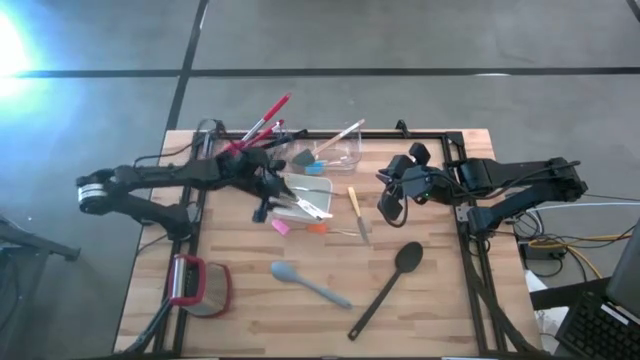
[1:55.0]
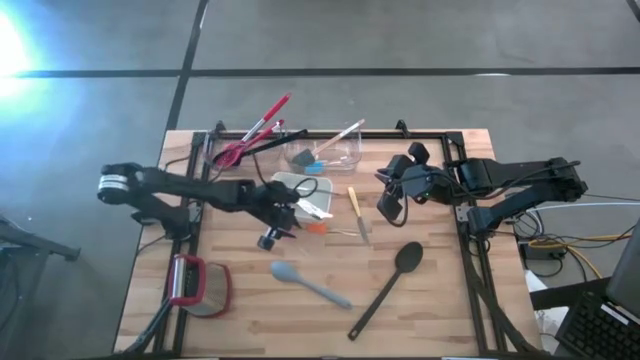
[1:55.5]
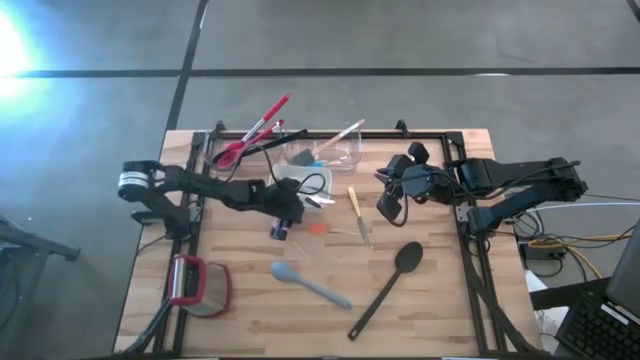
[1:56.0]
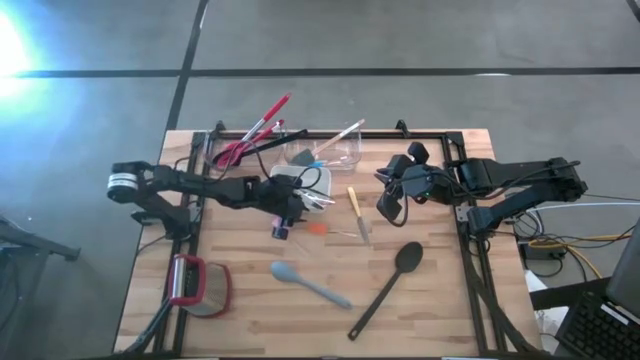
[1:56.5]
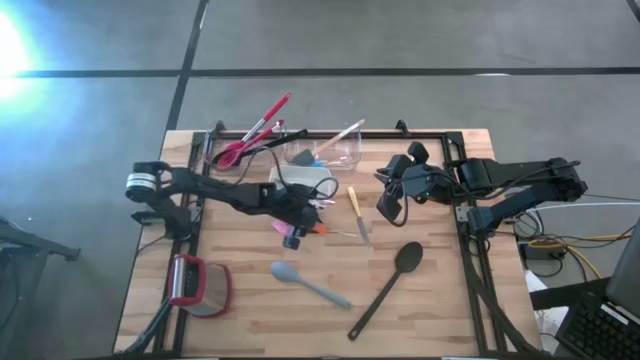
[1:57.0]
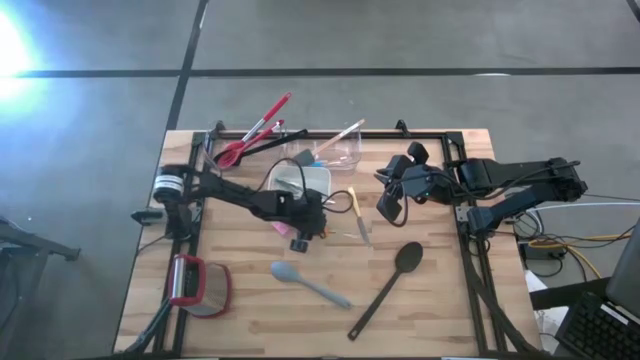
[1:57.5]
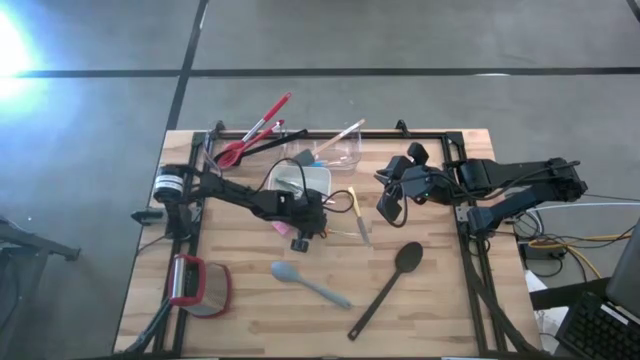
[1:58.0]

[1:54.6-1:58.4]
Task: Pick & Place Kitchen Items
Put the orange spatula into the right transparent bin

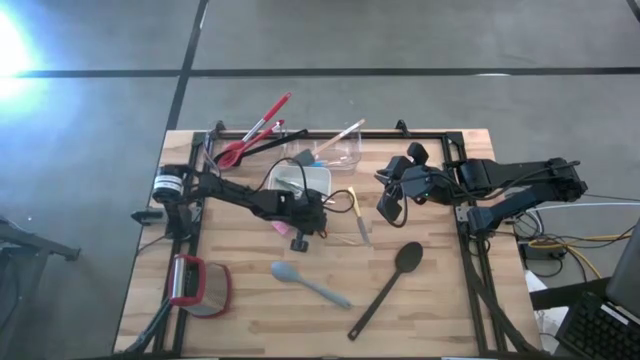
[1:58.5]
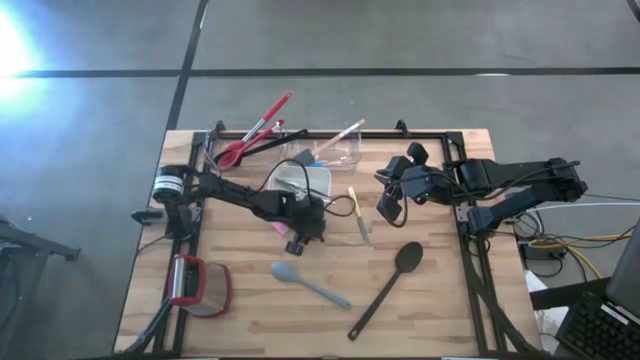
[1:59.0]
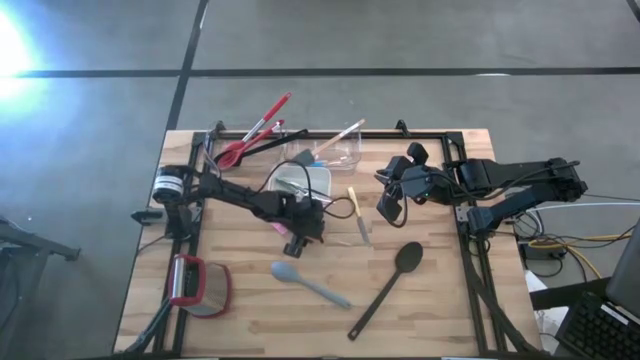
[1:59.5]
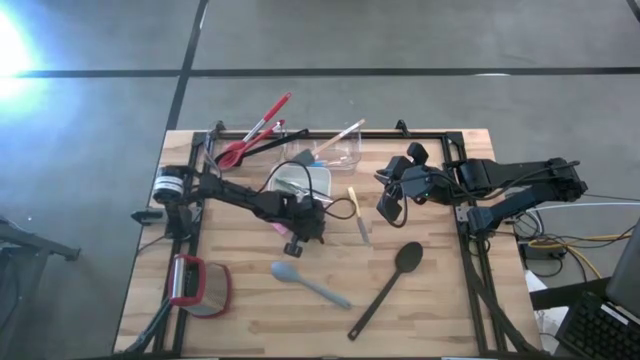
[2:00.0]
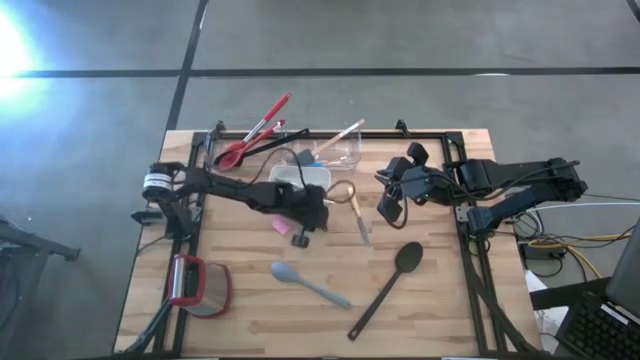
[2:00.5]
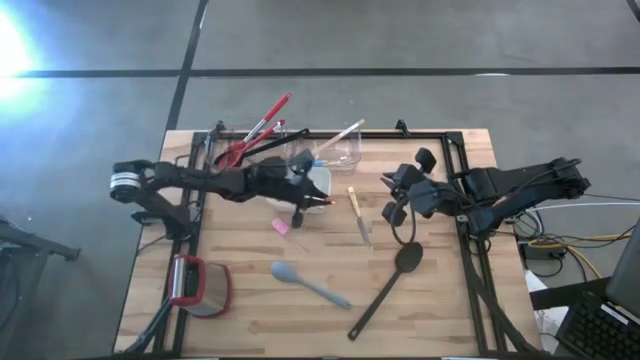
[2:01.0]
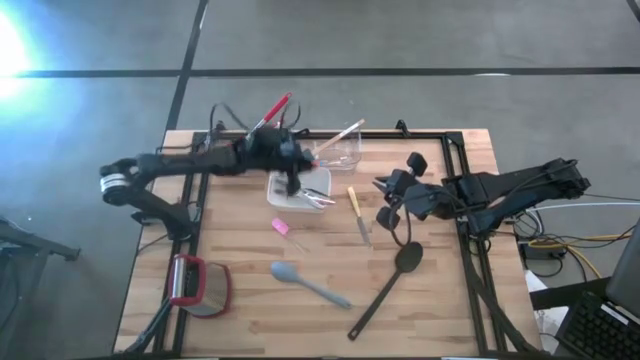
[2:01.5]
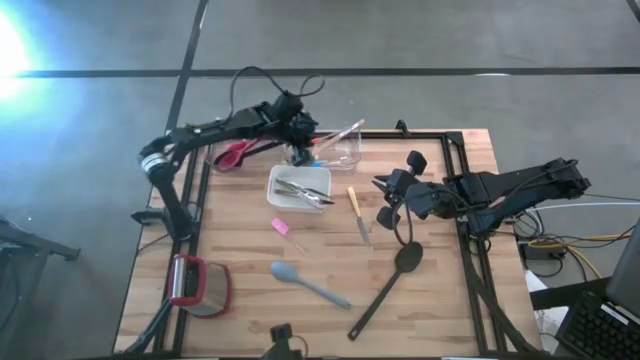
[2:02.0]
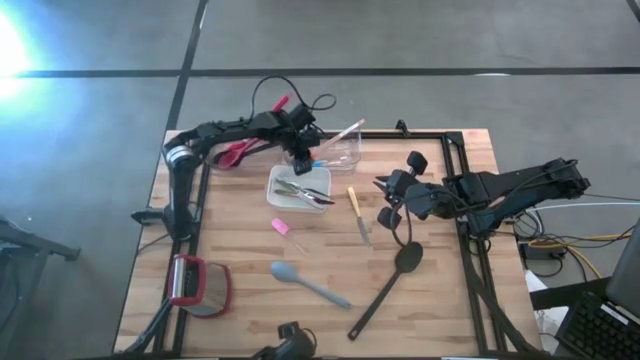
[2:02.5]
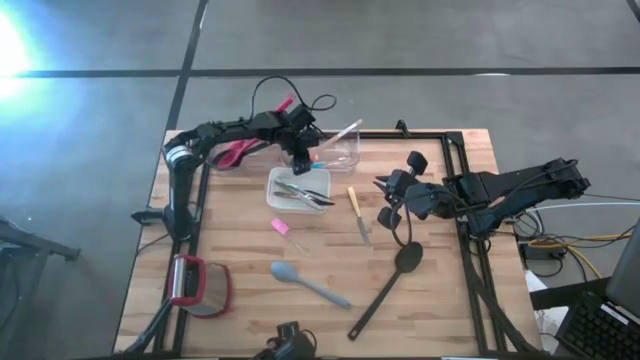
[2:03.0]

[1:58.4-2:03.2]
Put the orange spatula into the right transparent bin

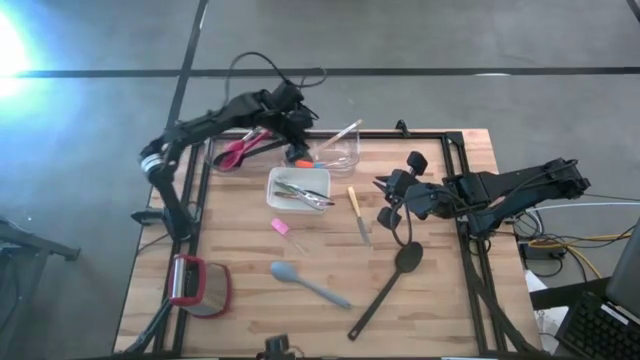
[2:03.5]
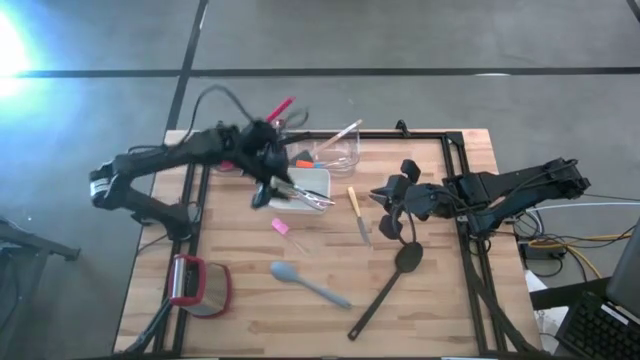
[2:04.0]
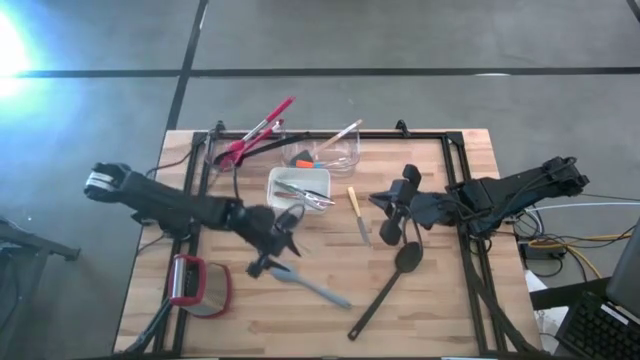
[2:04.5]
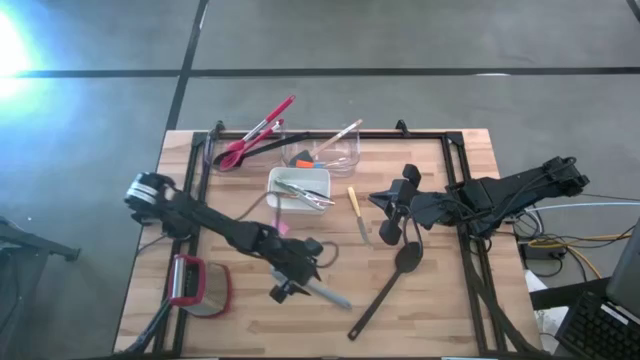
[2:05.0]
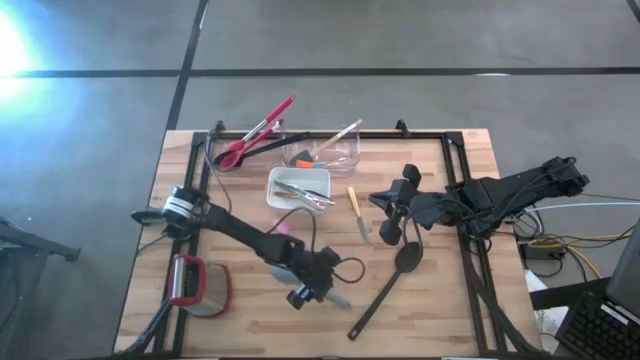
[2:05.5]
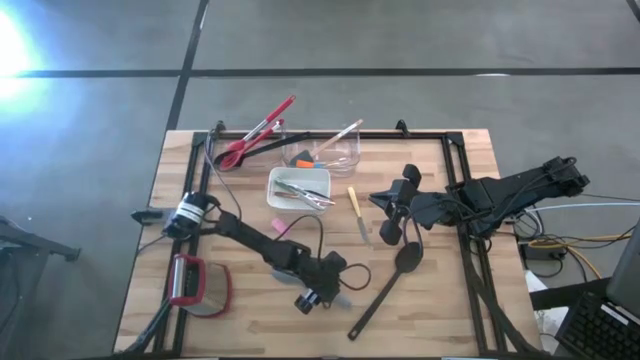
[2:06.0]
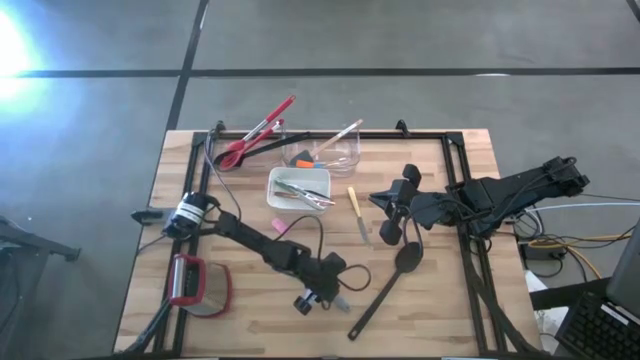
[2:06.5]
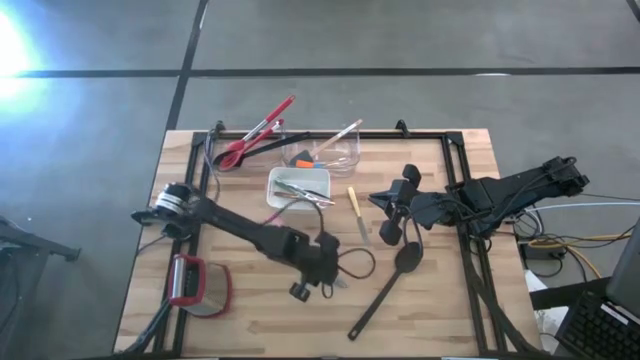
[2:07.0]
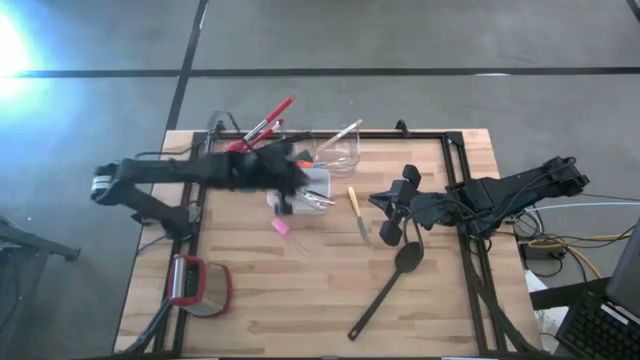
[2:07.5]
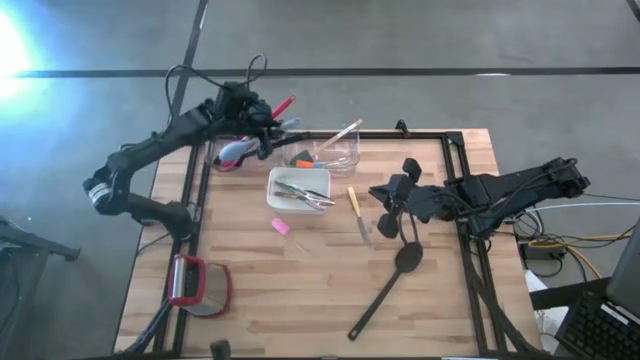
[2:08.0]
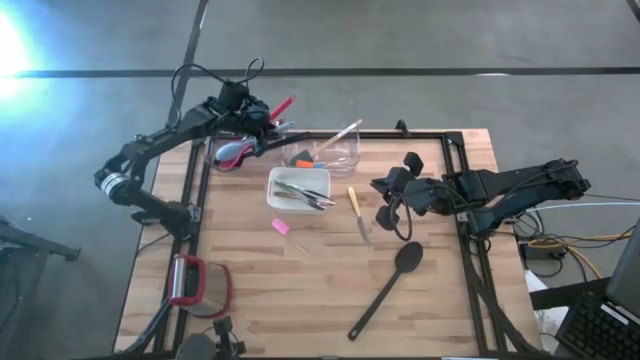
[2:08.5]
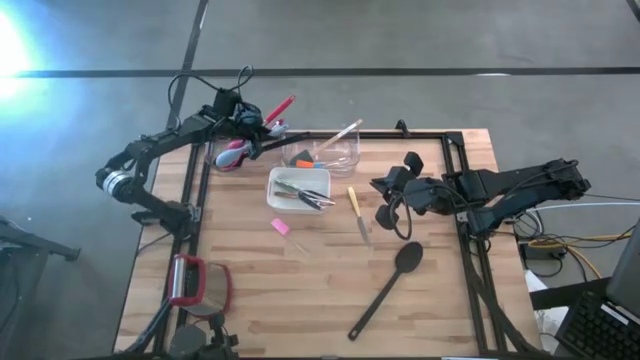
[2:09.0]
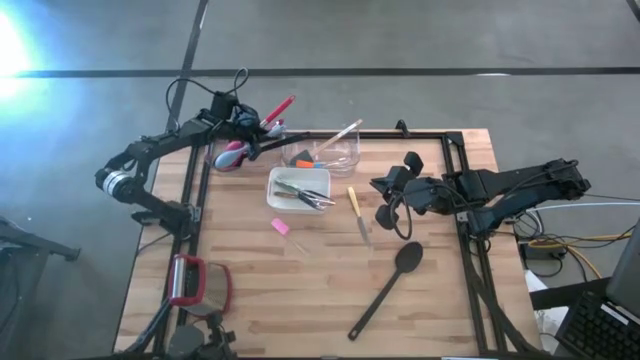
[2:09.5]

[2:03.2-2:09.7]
Put the gray serving spoon into the left transparent bin

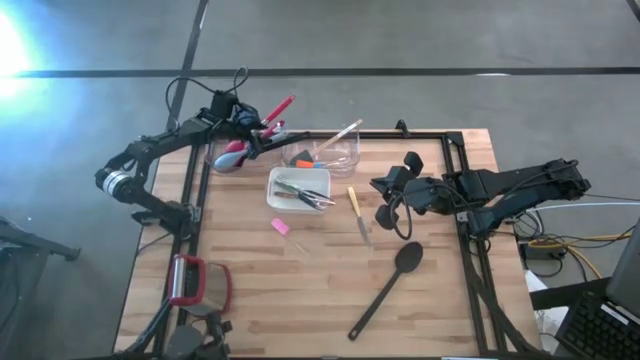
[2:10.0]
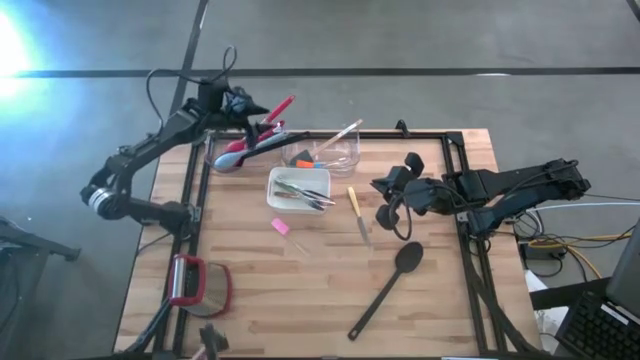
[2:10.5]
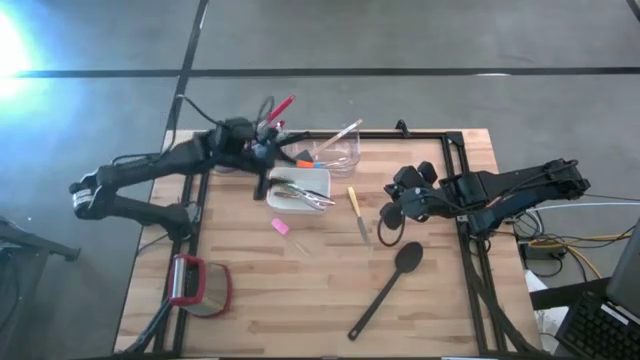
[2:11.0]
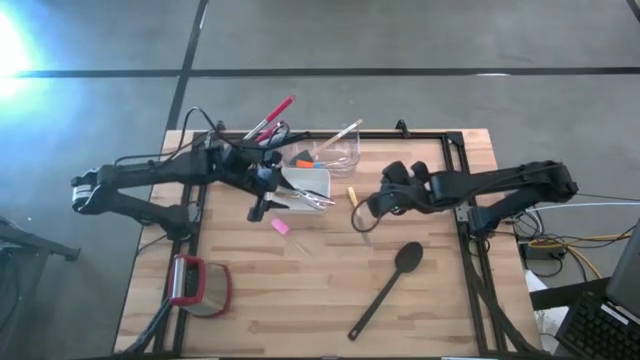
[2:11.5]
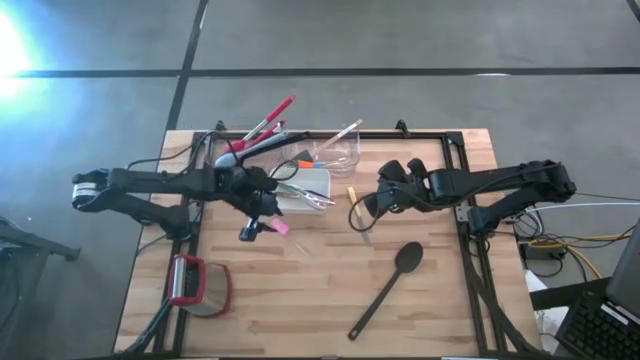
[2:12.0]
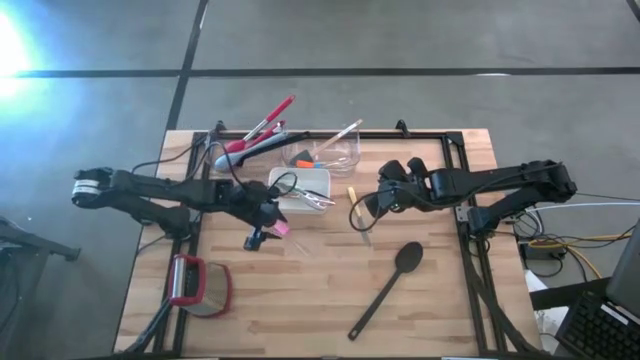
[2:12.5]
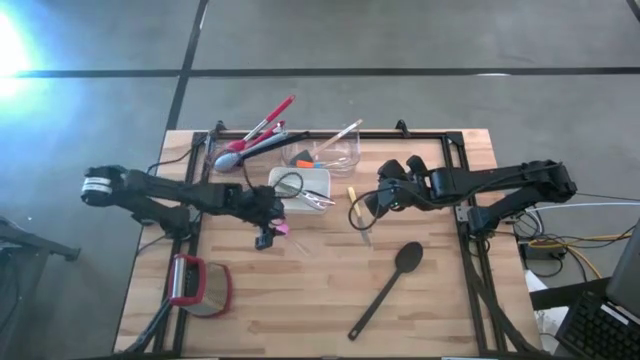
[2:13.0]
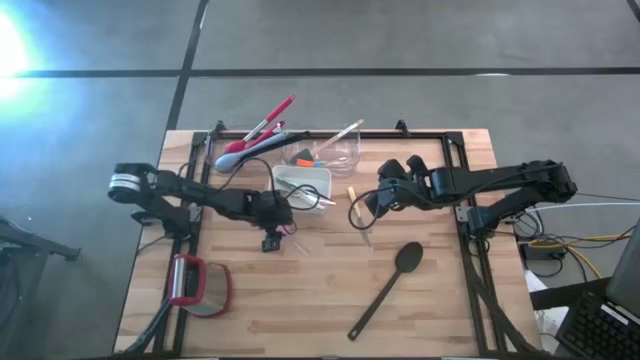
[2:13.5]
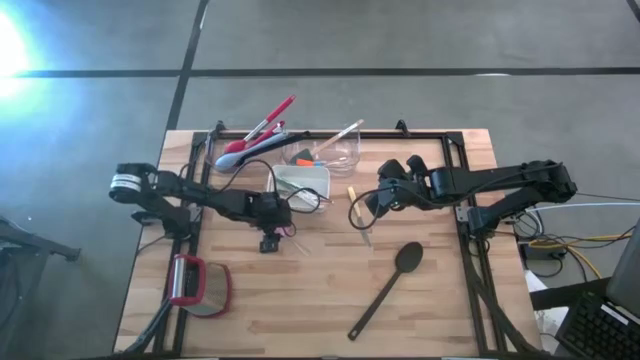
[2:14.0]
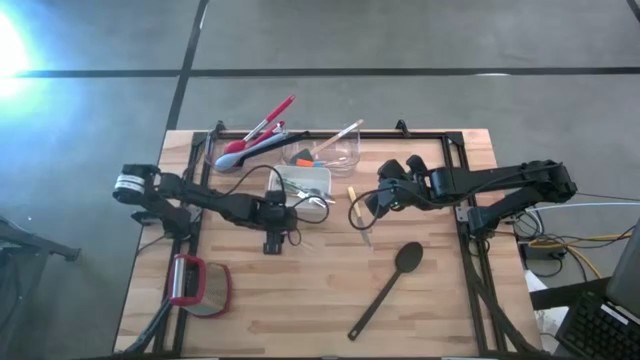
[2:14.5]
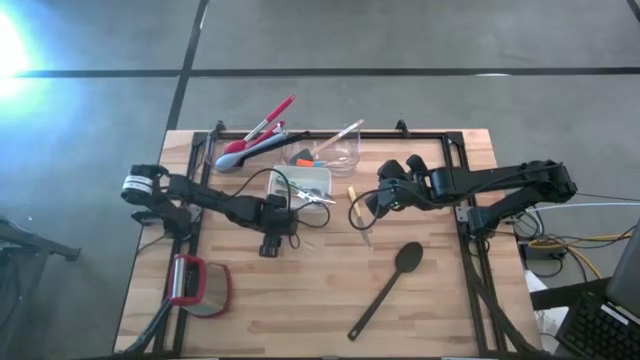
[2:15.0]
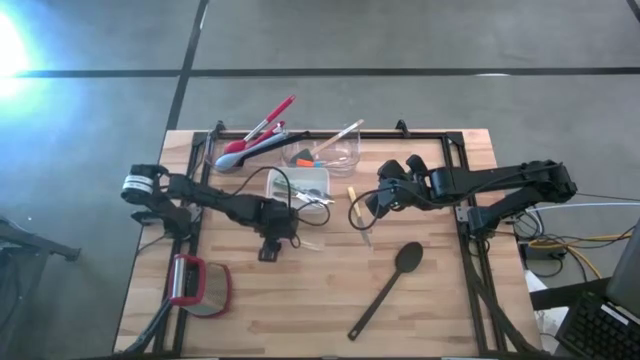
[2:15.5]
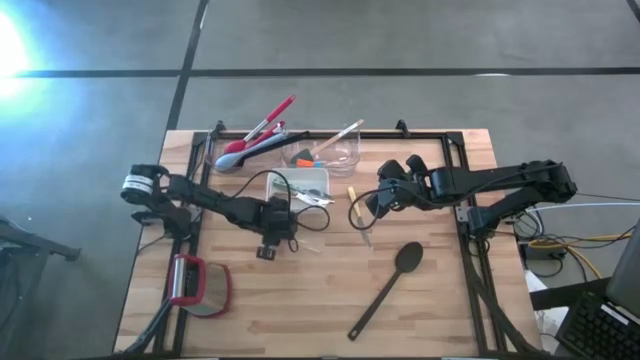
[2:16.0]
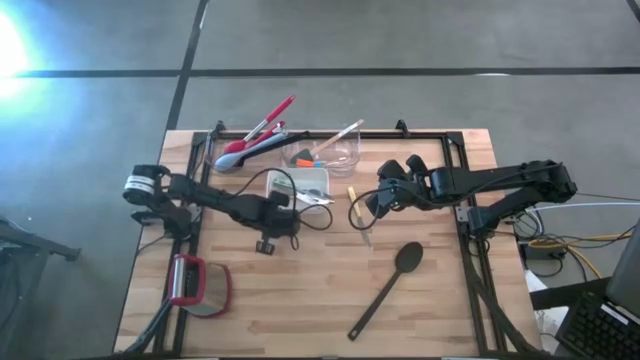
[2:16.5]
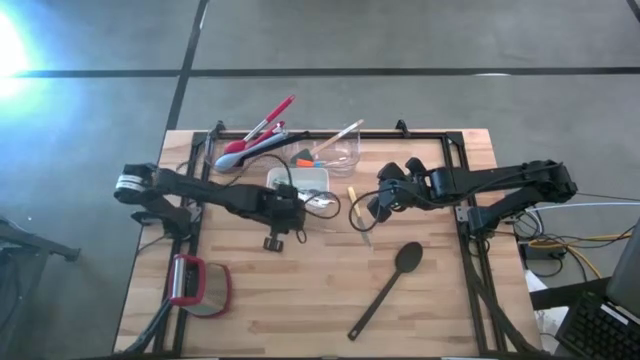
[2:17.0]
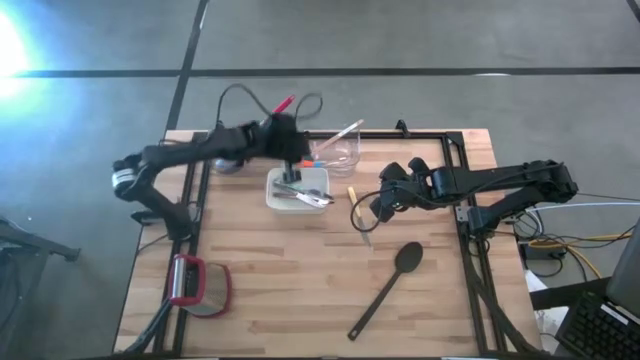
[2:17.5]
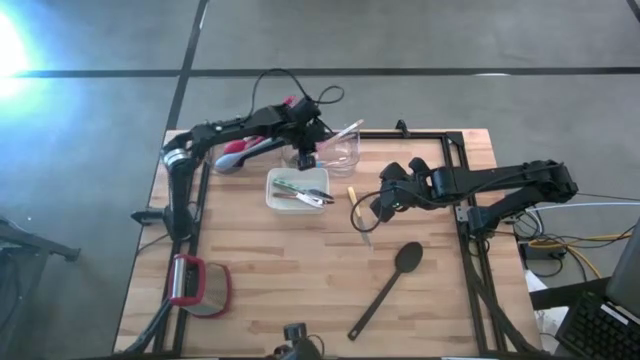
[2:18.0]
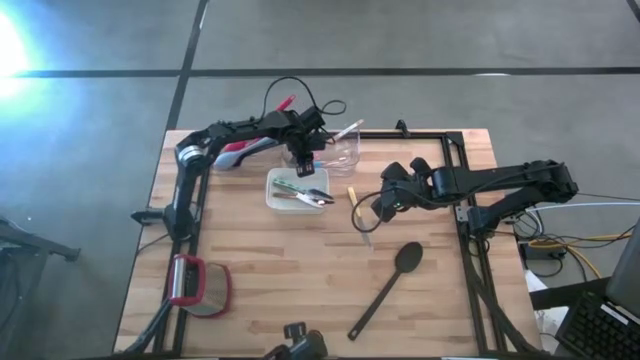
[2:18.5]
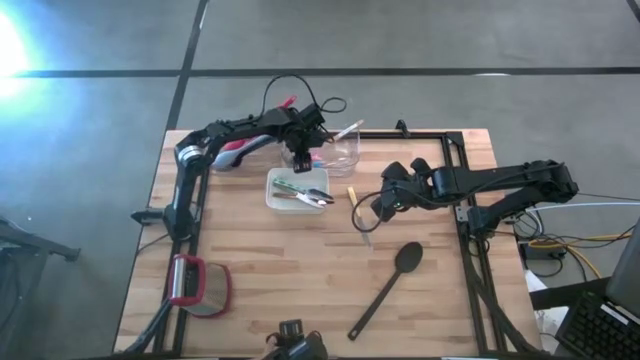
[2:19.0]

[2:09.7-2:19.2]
Put the pink spatula into the right transparent bin
